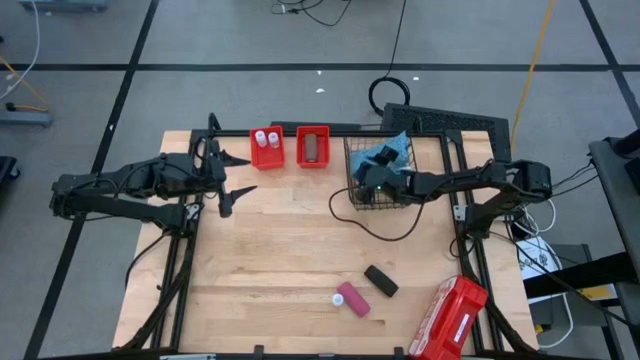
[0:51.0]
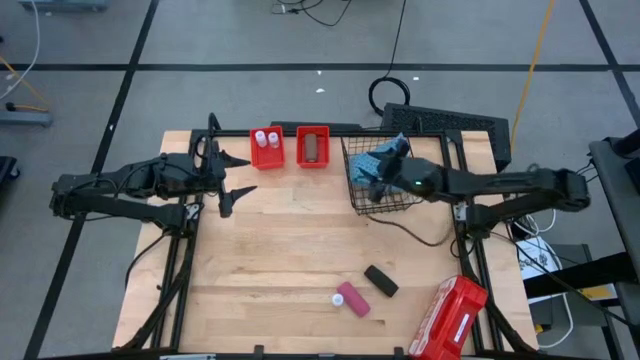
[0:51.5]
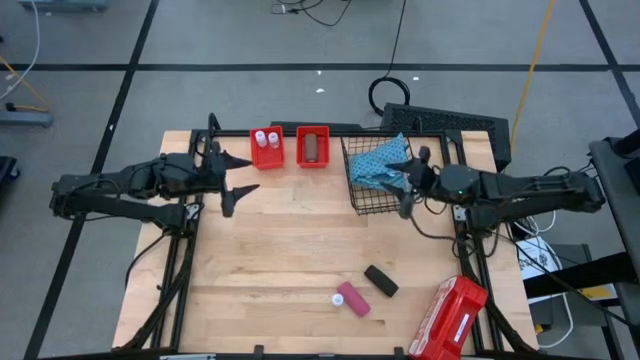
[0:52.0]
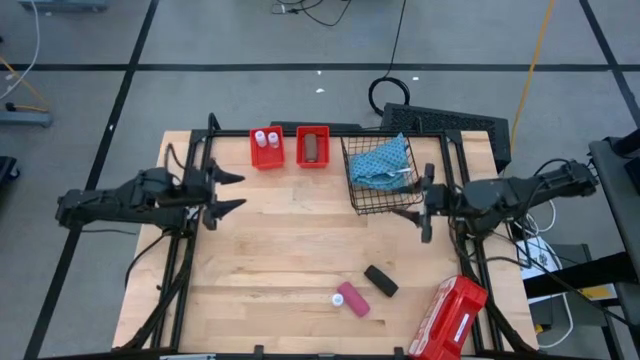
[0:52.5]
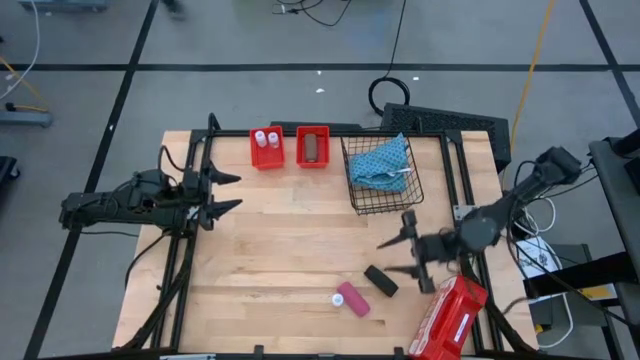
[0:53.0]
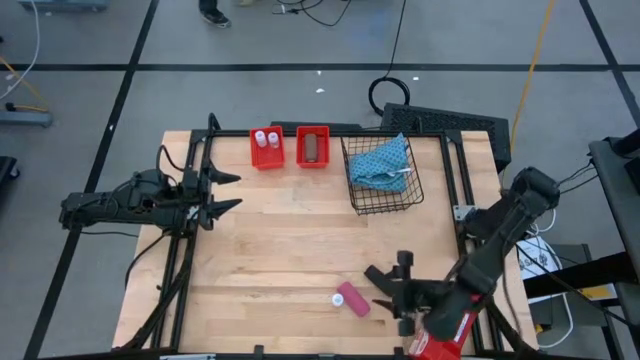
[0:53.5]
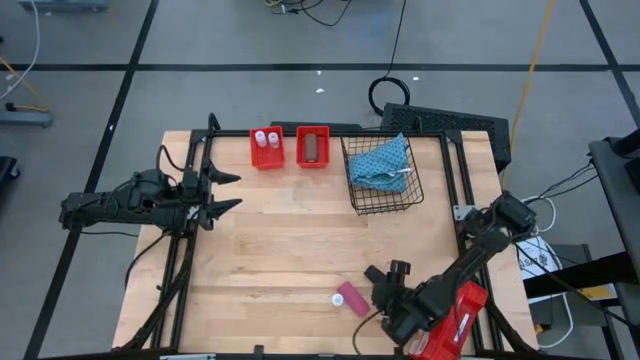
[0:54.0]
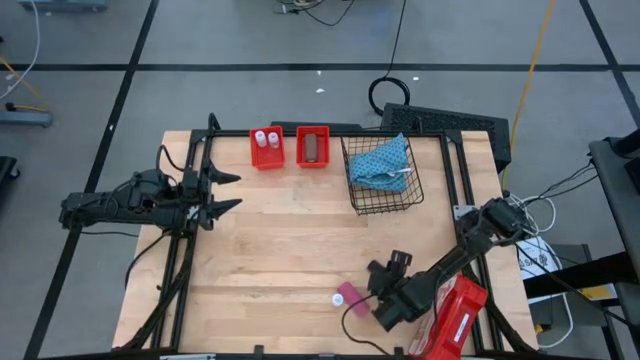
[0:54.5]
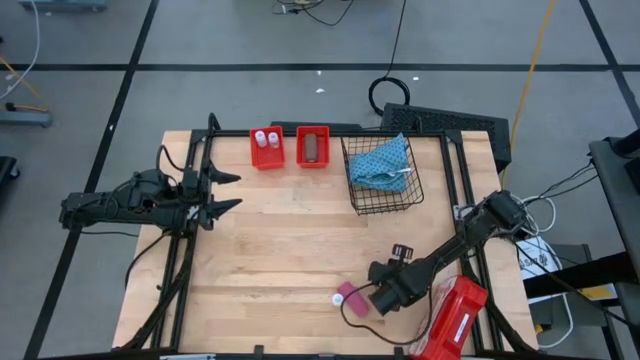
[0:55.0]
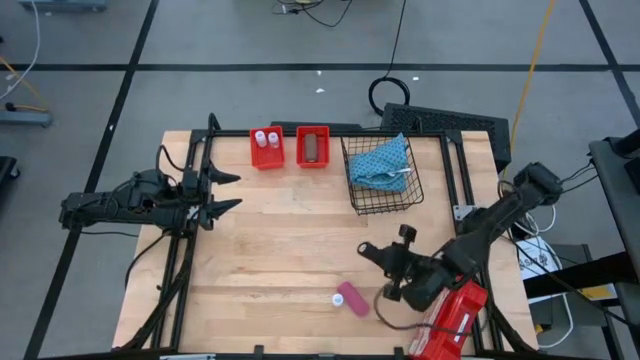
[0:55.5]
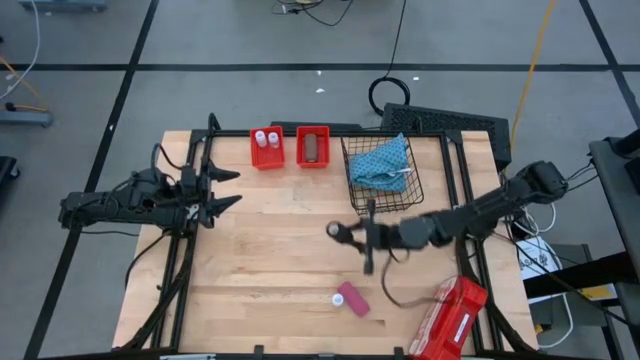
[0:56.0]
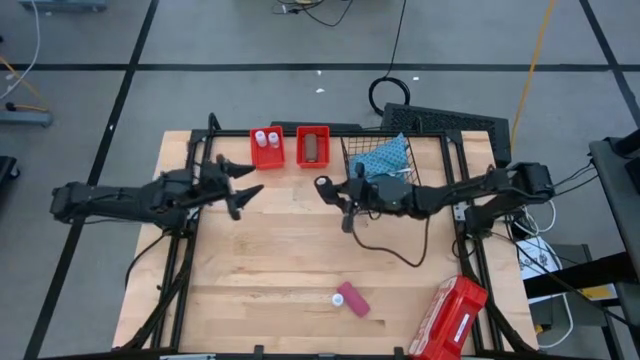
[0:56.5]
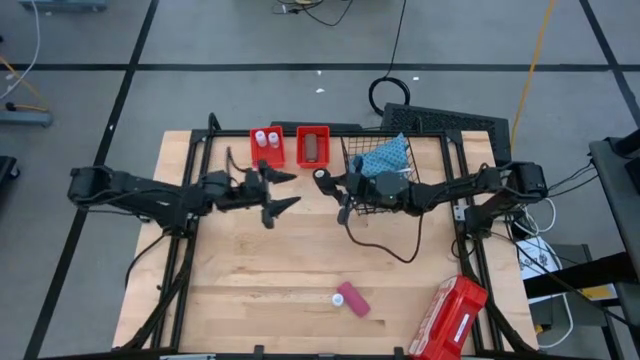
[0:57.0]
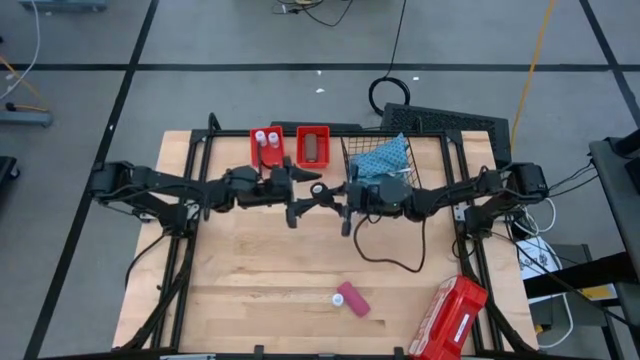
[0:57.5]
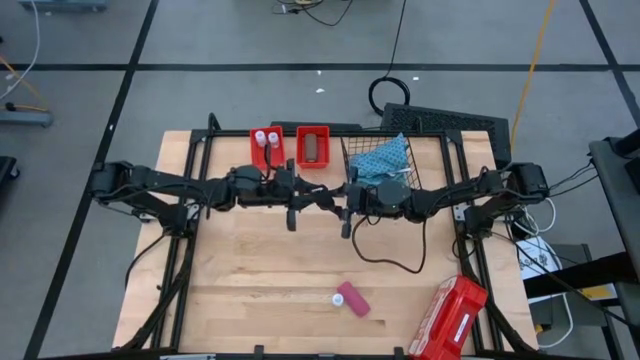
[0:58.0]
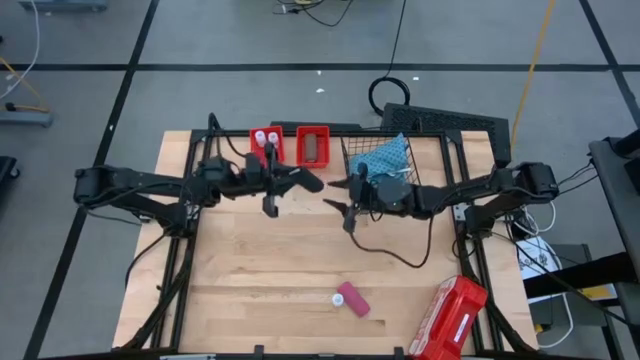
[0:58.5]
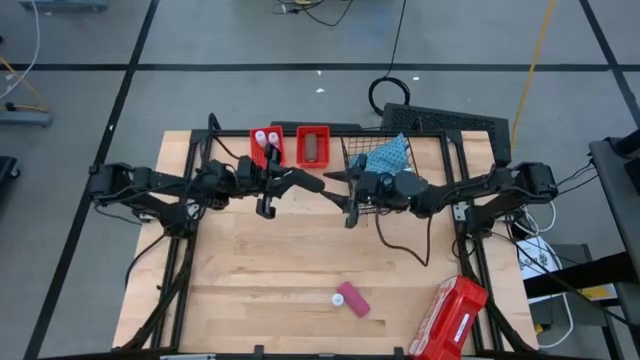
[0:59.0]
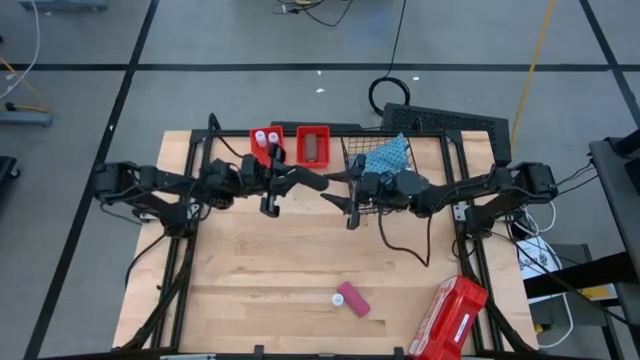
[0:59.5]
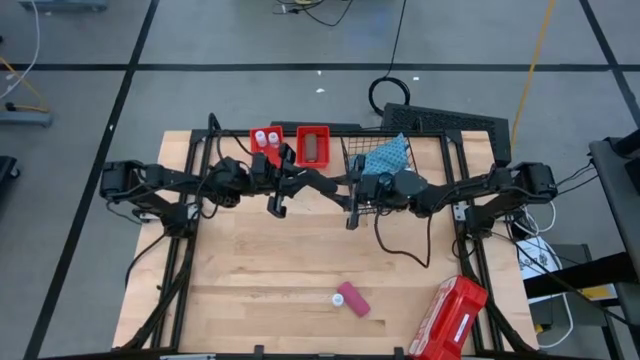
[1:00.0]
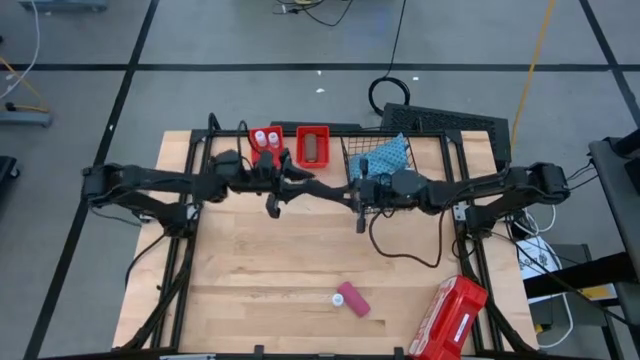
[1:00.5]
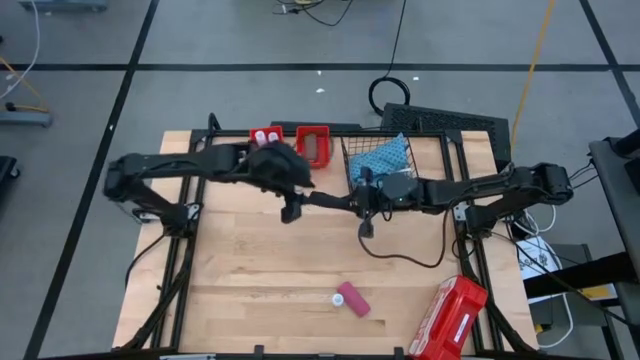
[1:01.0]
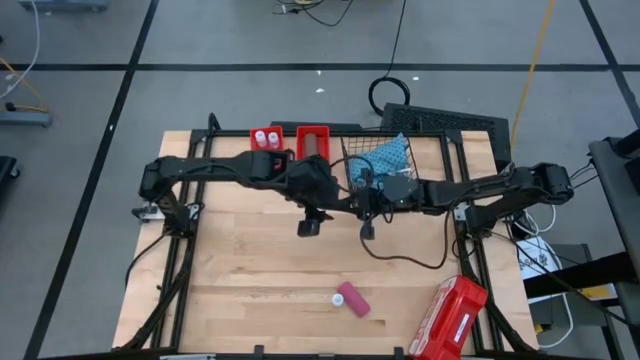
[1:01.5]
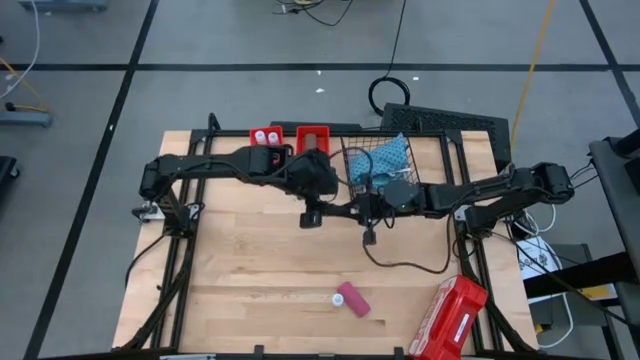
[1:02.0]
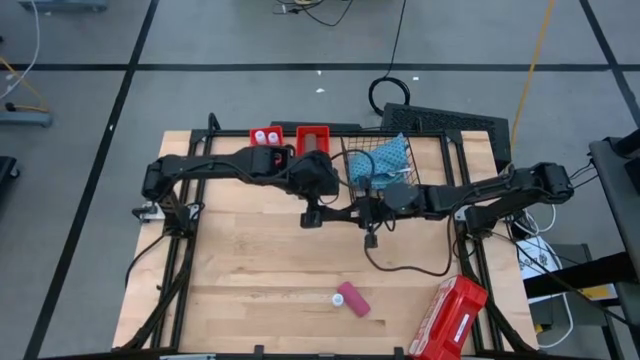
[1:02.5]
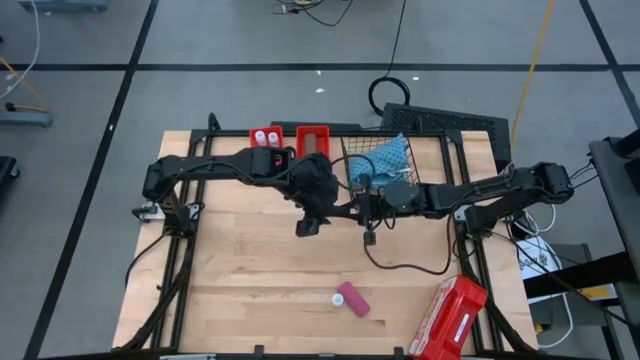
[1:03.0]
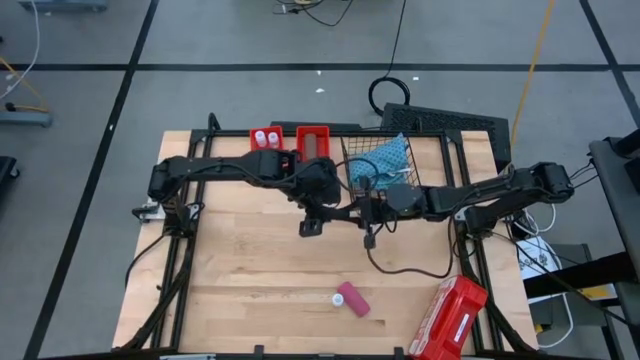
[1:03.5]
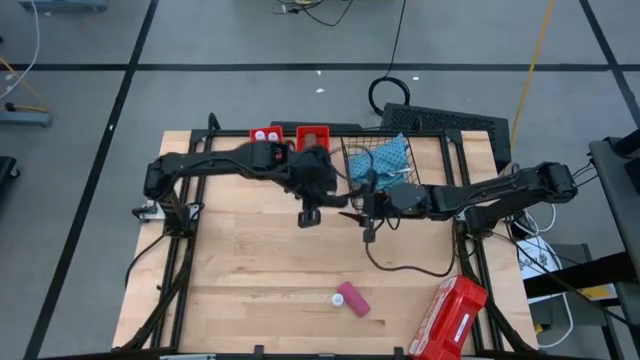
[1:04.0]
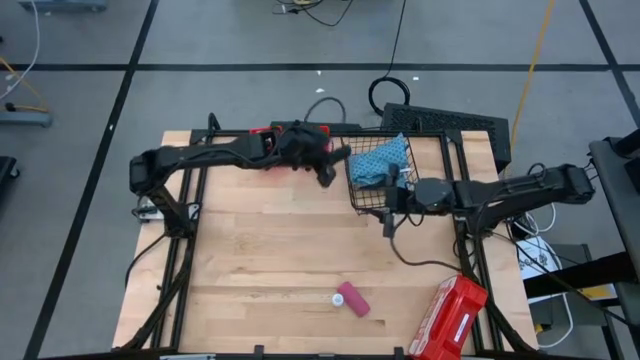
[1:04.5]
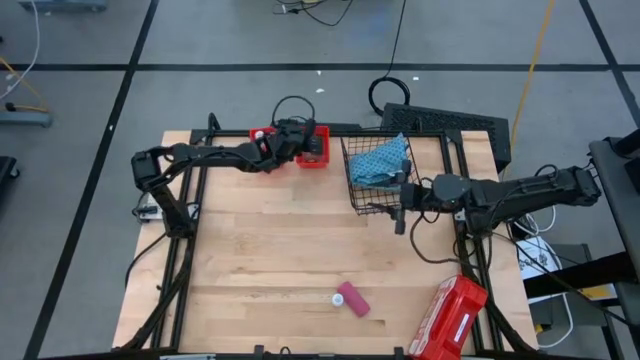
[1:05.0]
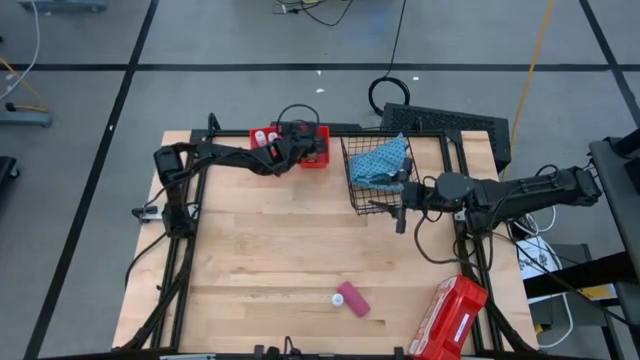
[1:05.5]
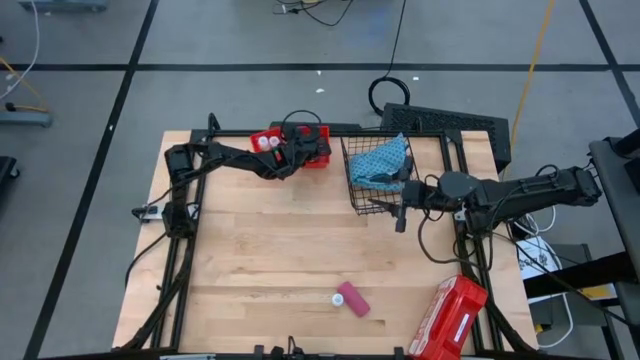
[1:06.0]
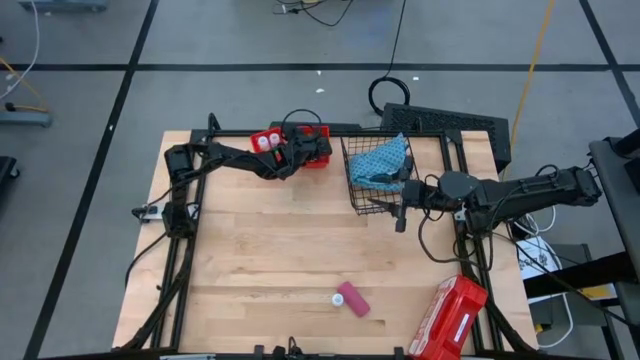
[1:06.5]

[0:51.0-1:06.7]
Task: Pick & Place Medicine items
Put the black bandage into the right orange basket

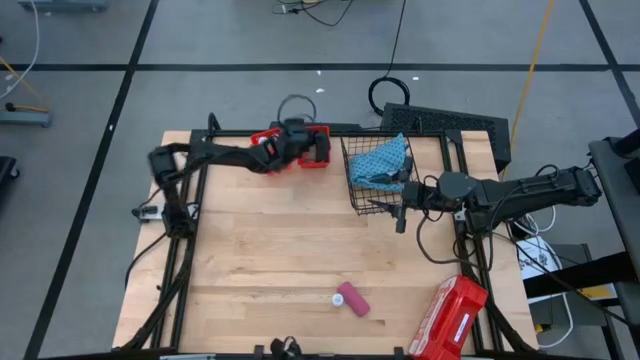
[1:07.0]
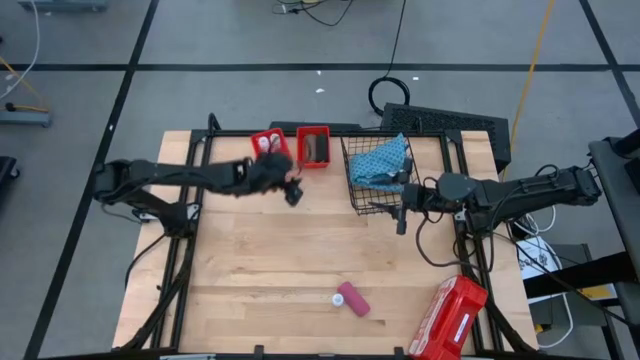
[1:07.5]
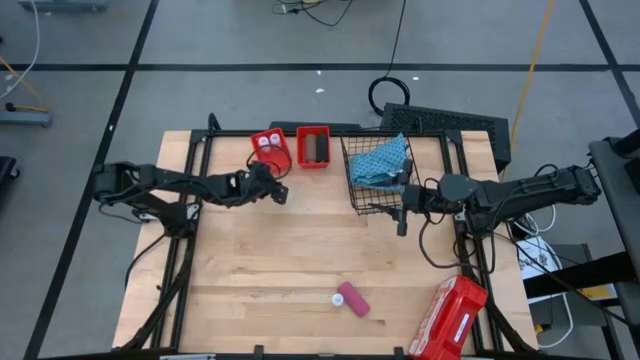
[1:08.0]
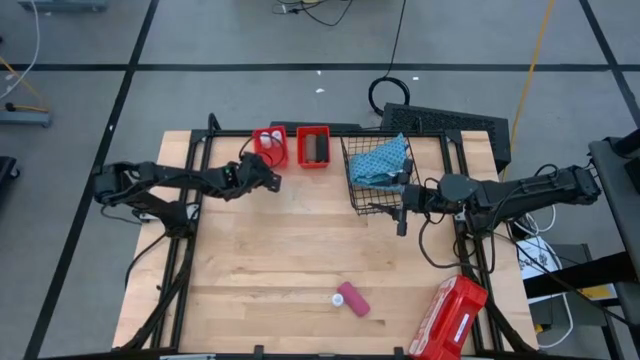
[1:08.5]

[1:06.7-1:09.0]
Adjust the left orange basket on the table
